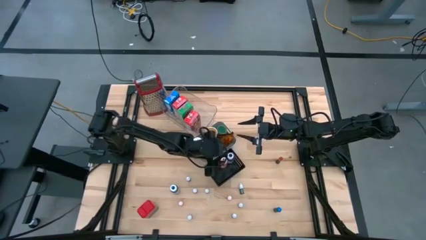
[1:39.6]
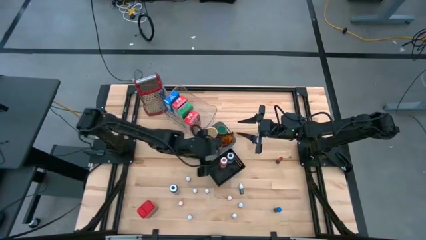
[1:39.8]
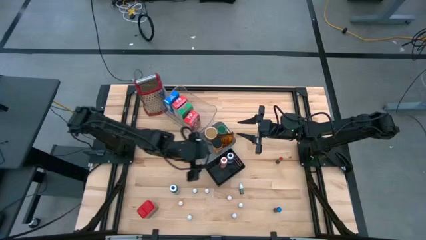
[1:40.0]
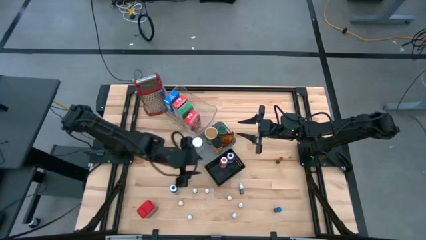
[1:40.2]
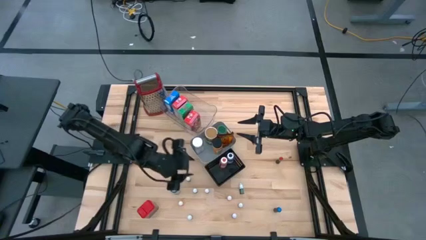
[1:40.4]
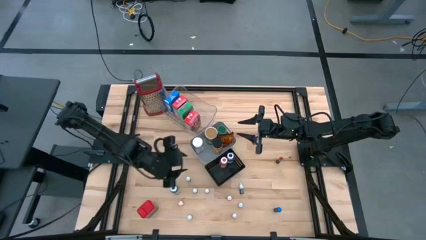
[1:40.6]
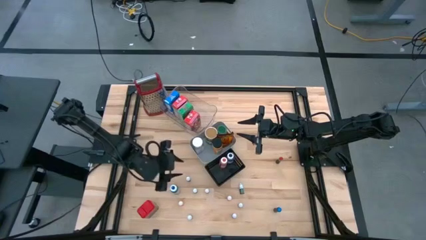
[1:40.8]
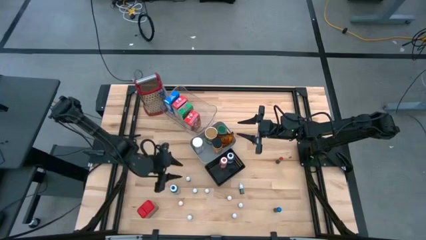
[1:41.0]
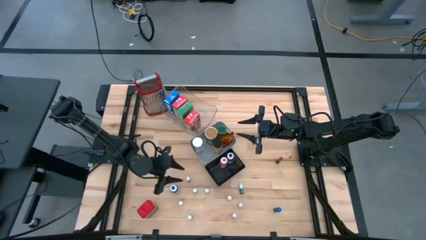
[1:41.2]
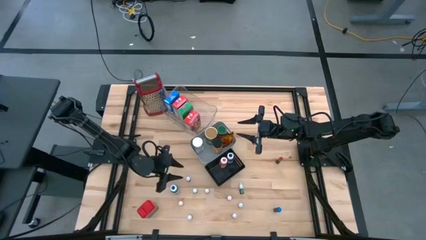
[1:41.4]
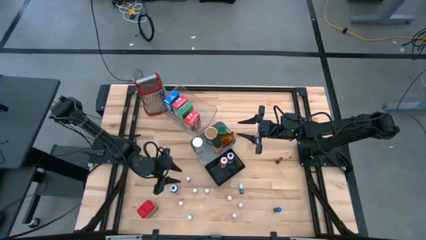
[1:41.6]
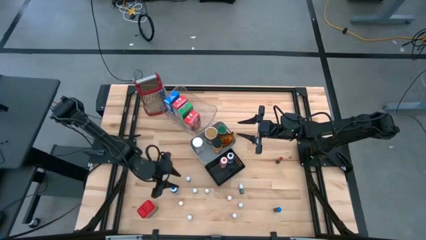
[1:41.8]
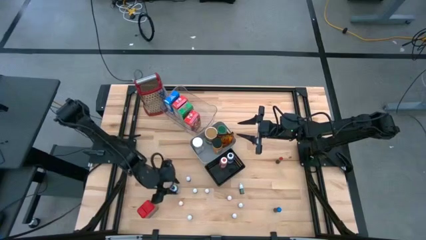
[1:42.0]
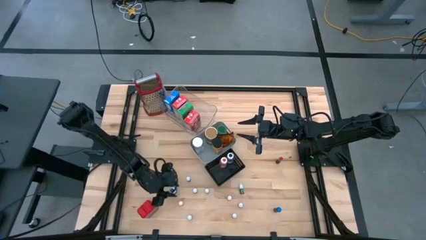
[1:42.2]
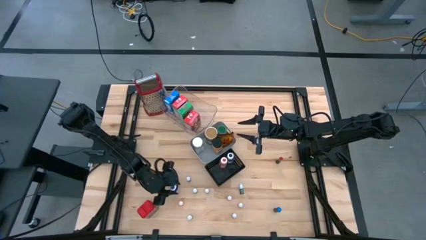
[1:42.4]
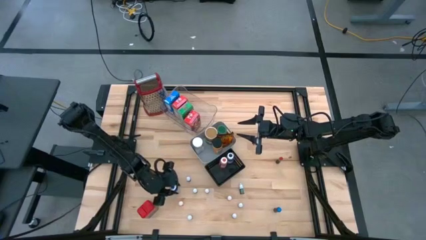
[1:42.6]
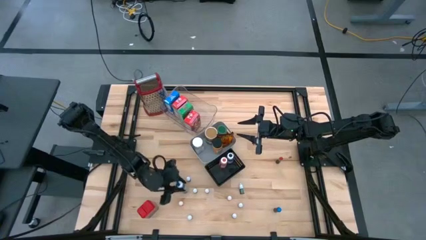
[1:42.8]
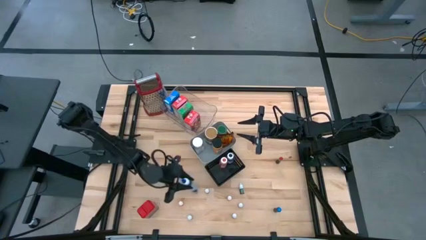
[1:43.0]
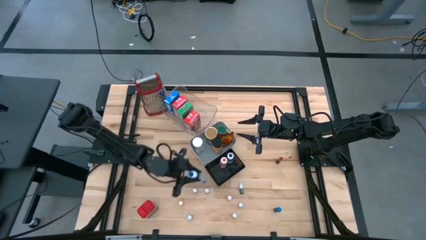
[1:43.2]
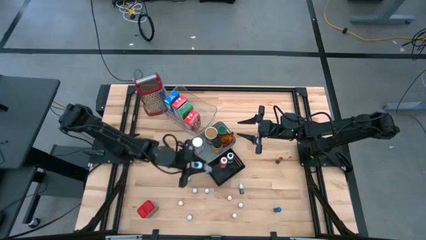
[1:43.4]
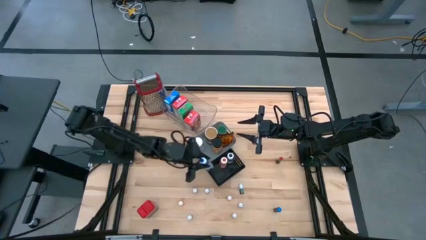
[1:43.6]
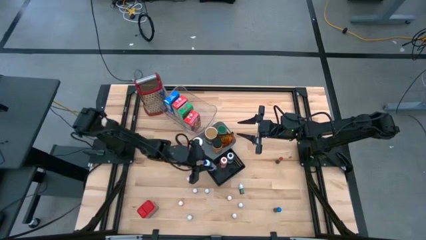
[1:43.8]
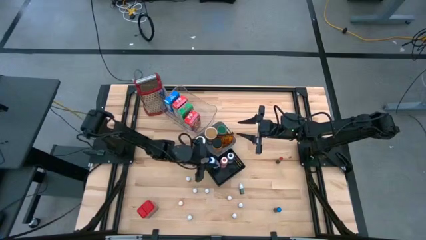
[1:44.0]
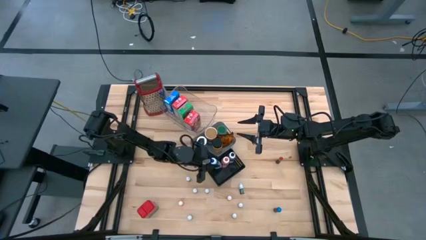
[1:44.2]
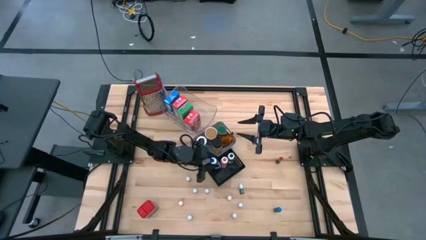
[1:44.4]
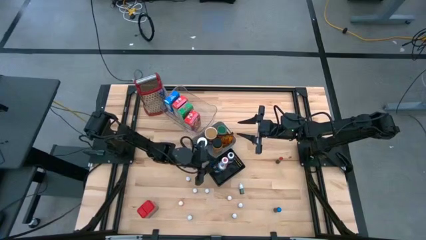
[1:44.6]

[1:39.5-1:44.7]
Task: Pick & Place Kitchen Items
Put the blue food coloring bottle into the black bin

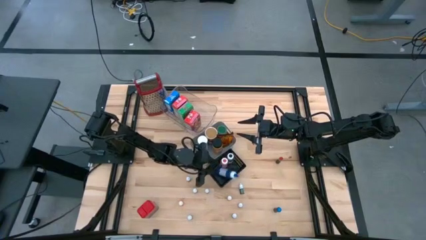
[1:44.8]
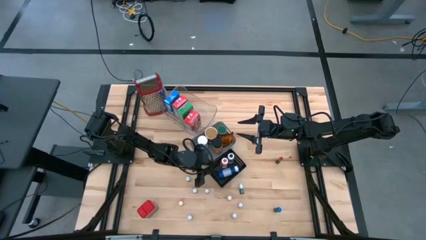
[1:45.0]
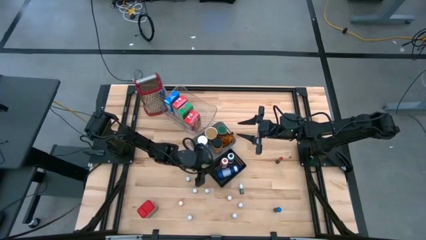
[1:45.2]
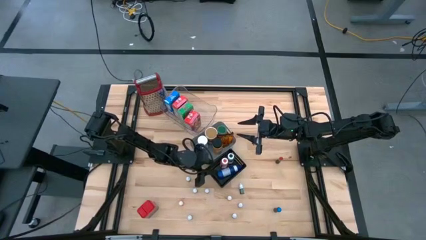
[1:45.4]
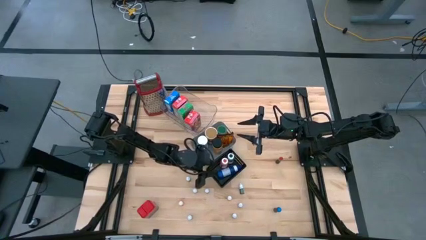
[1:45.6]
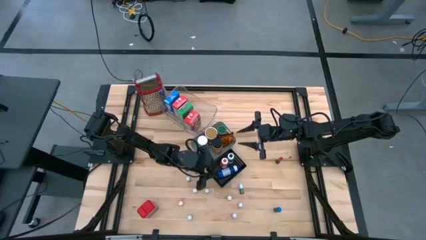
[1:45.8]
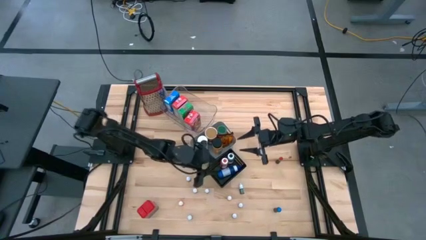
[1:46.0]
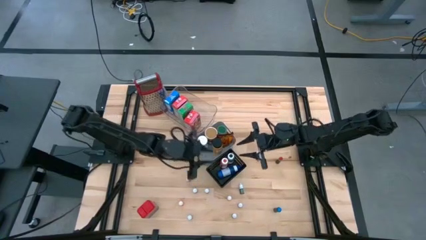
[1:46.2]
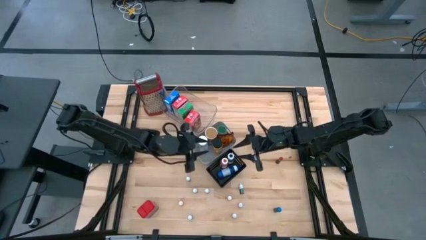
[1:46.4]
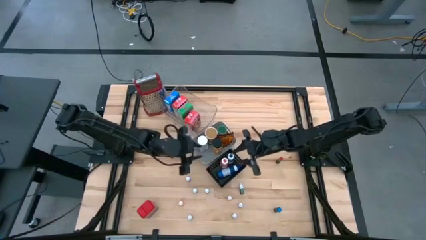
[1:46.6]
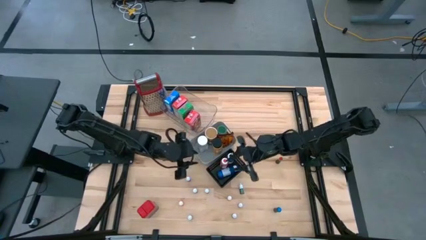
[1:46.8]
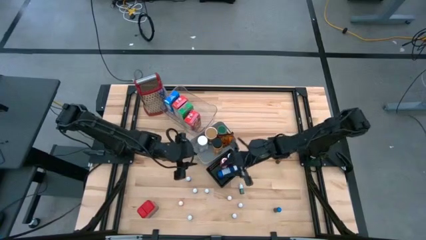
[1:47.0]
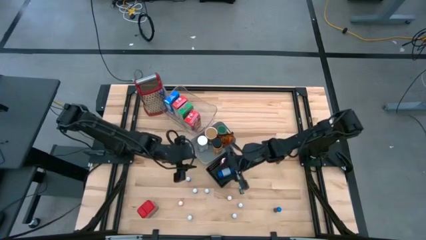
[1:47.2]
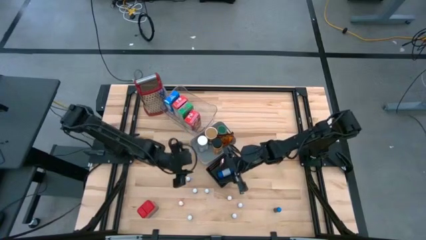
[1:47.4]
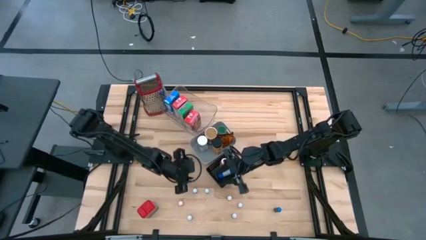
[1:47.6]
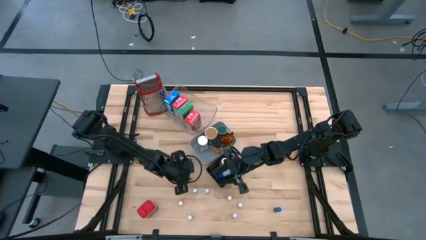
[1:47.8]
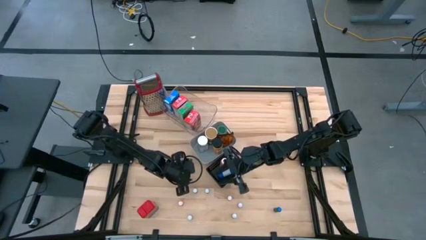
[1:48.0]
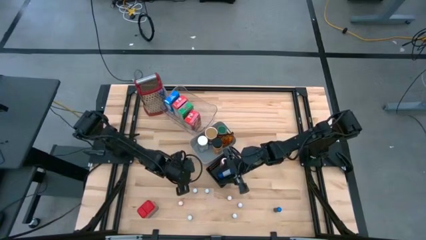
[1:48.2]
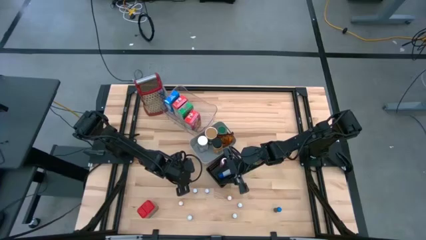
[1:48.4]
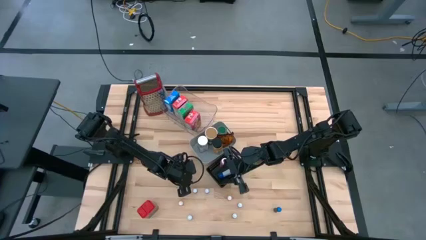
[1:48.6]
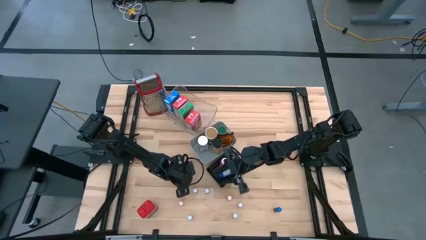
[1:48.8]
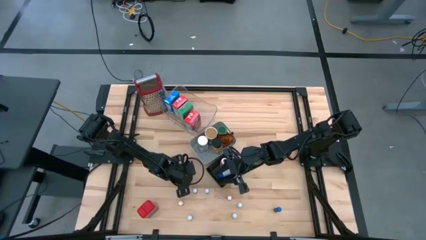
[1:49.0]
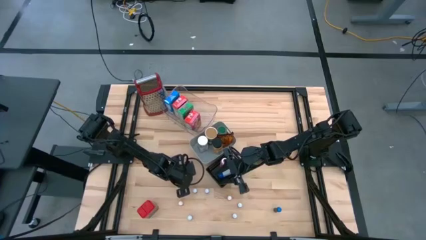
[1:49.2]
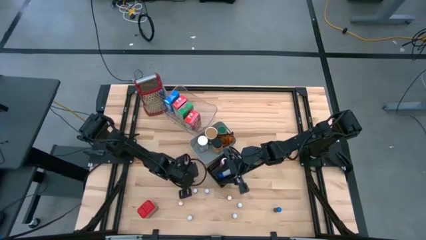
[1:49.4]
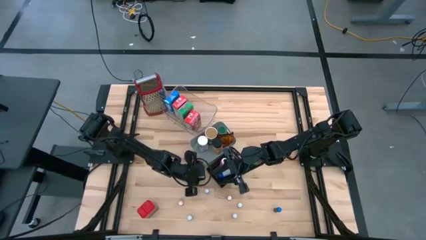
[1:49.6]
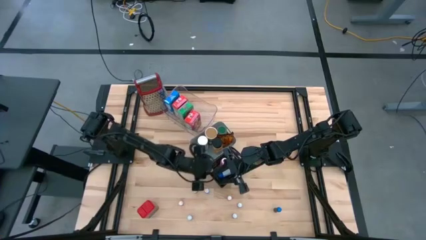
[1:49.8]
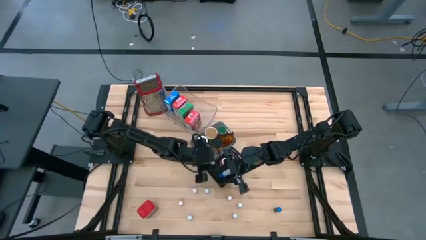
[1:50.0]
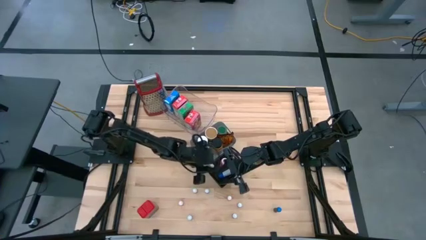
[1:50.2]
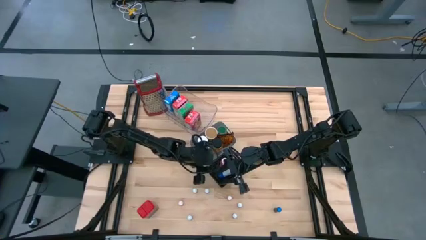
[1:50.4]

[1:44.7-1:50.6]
Put the black small food coloring bottle into the black bin

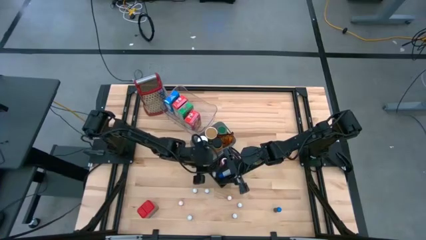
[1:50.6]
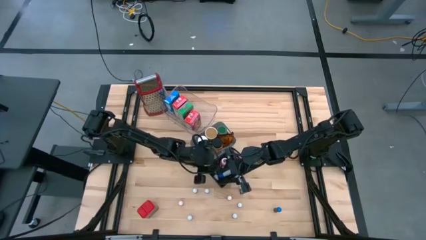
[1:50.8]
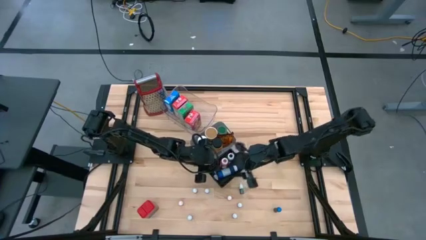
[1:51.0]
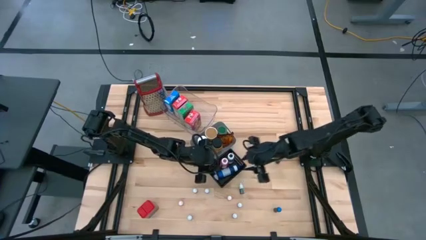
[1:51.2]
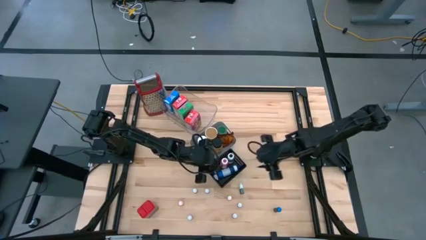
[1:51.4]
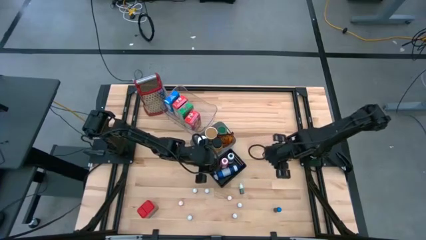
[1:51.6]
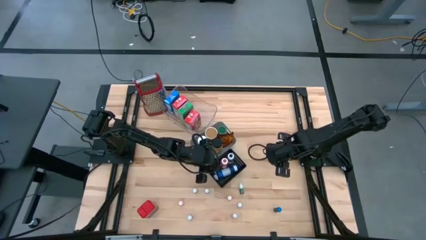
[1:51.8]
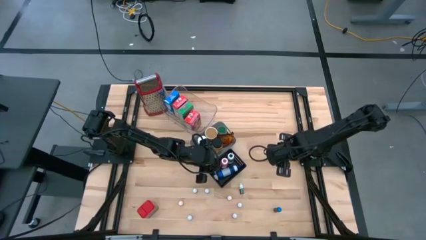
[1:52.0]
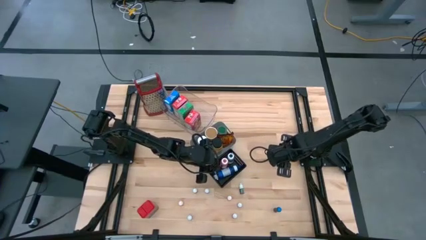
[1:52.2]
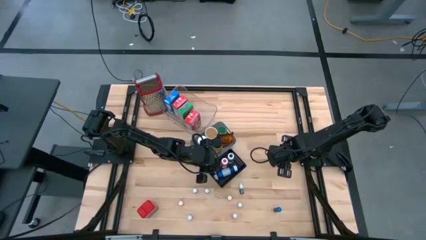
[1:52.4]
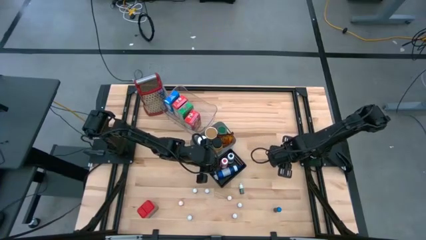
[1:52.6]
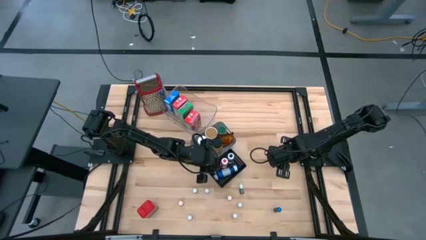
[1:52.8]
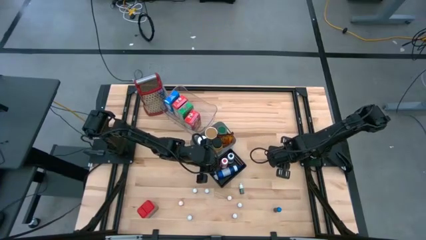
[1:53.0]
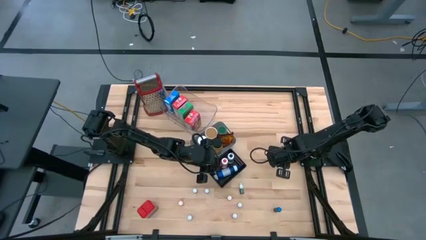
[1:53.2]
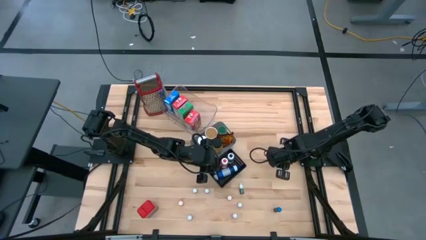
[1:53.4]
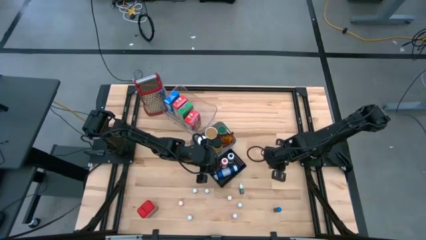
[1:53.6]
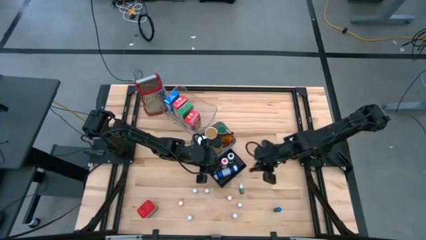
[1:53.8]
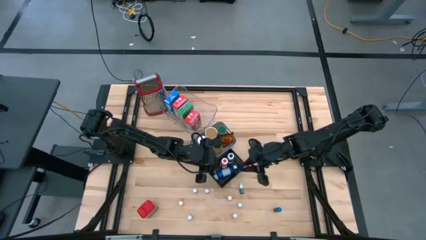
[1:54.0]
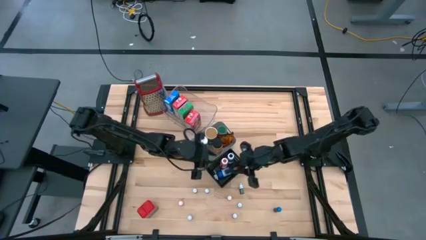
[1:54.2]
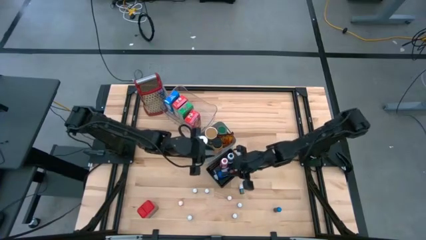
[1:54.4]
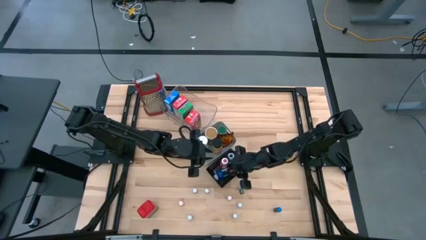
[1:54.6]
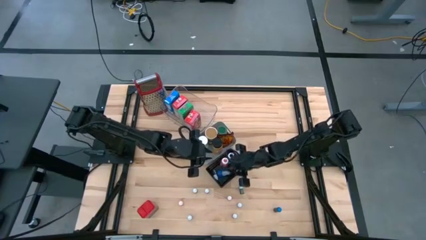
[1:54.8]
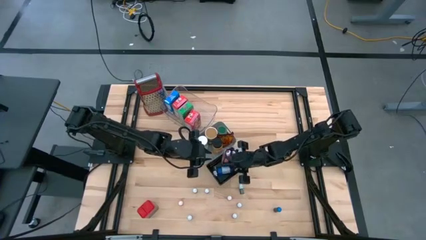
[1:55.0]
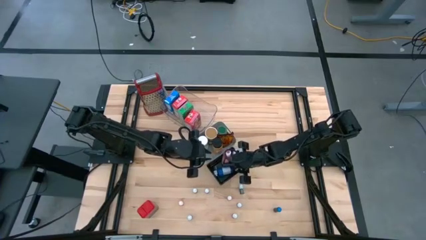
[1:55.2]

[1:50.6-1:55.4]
Put the orange black food coloring into the black bin
